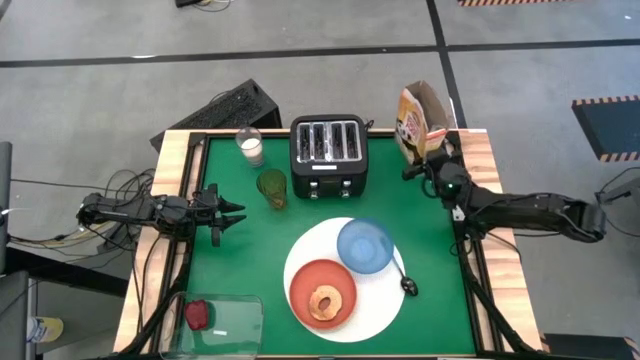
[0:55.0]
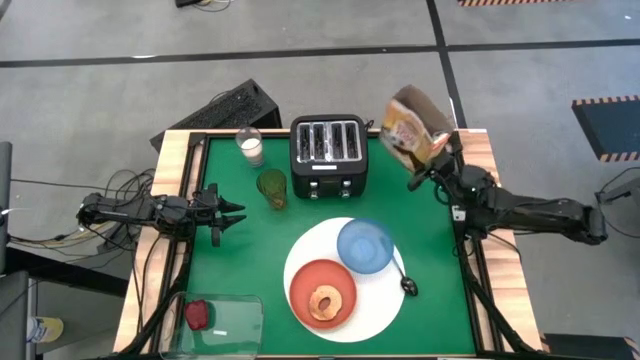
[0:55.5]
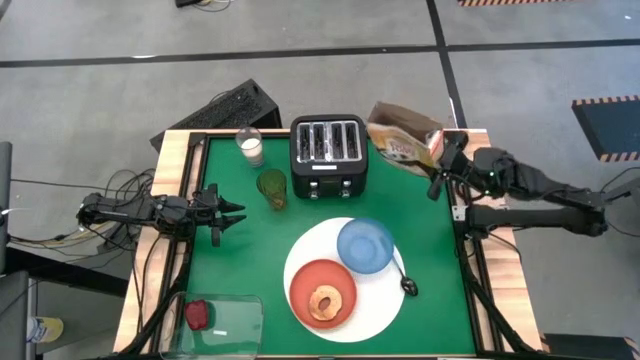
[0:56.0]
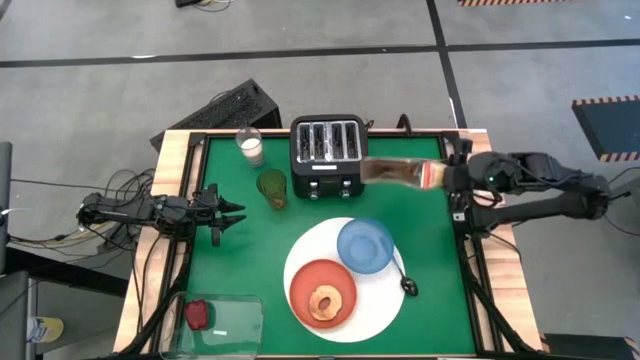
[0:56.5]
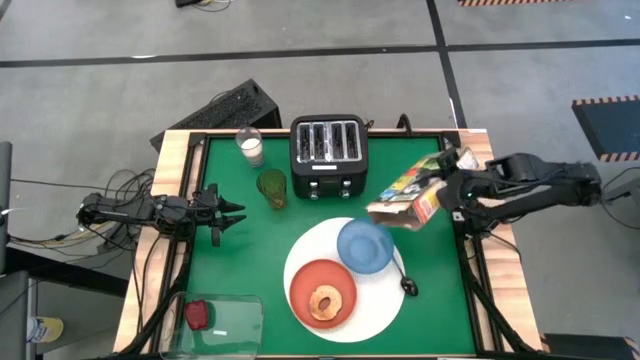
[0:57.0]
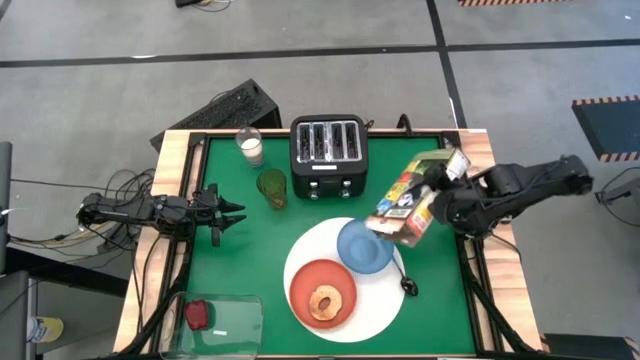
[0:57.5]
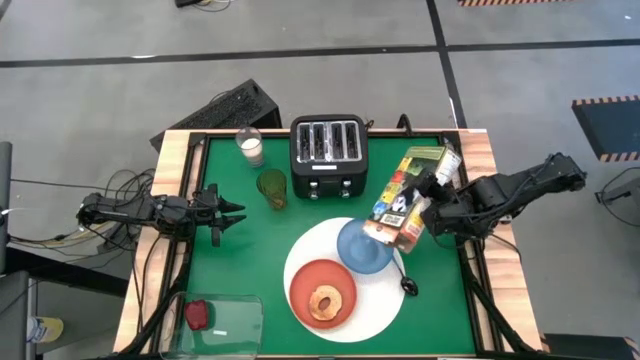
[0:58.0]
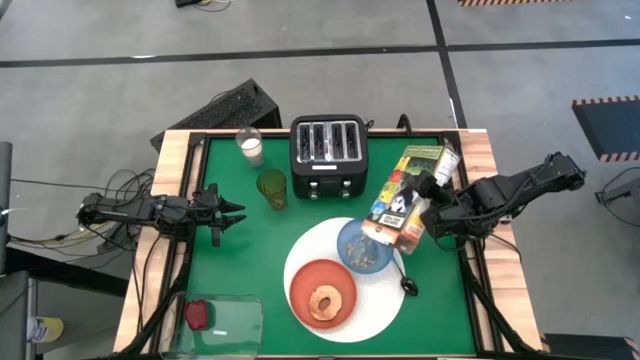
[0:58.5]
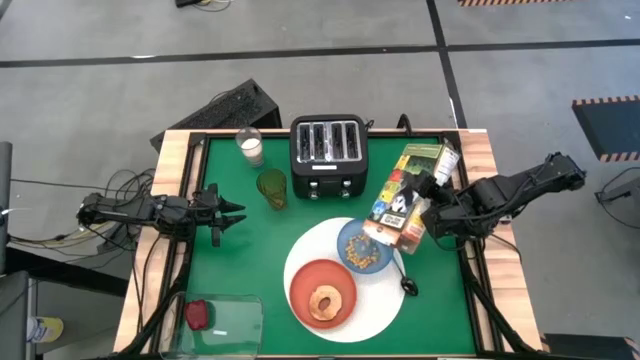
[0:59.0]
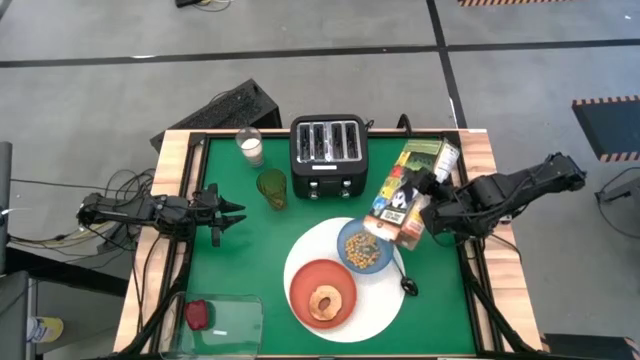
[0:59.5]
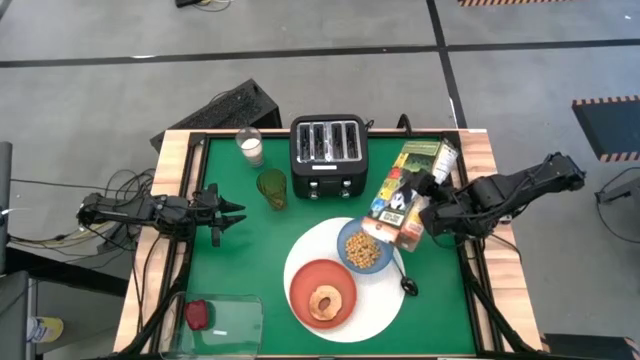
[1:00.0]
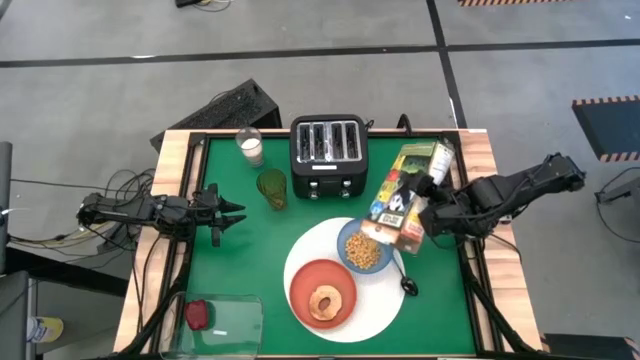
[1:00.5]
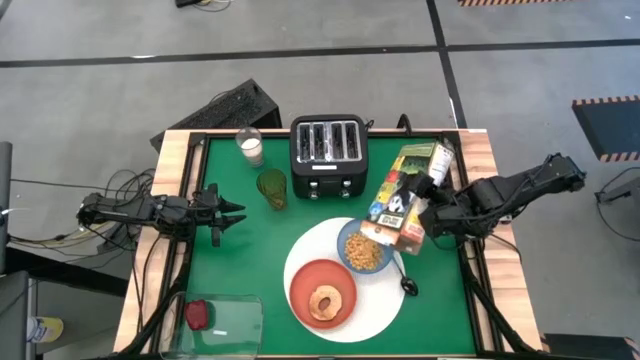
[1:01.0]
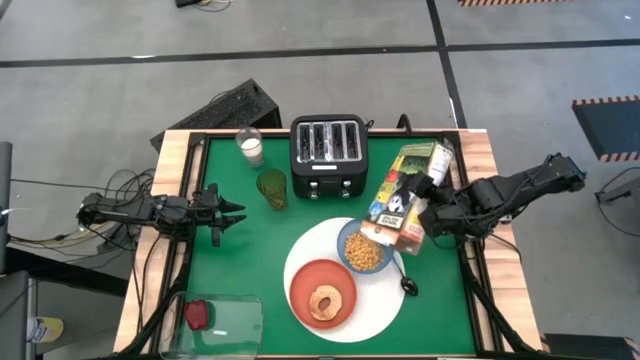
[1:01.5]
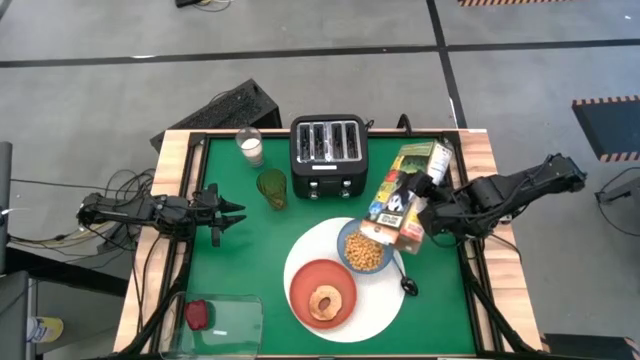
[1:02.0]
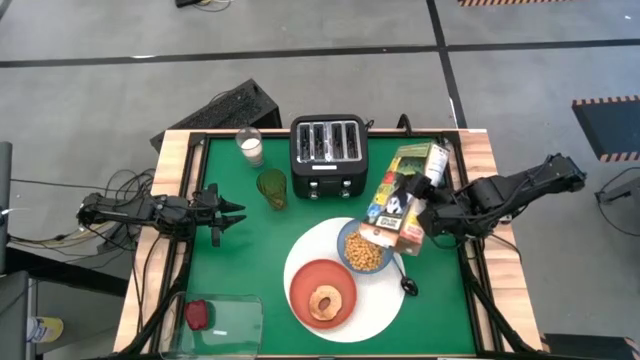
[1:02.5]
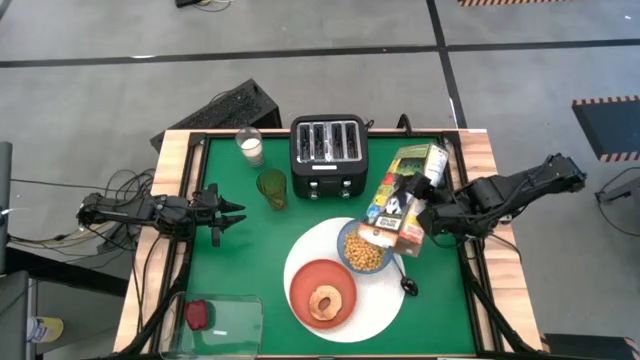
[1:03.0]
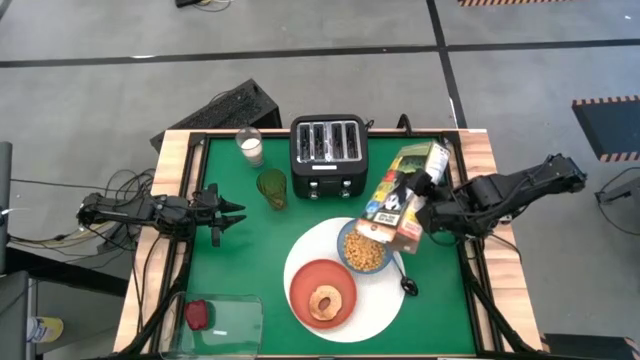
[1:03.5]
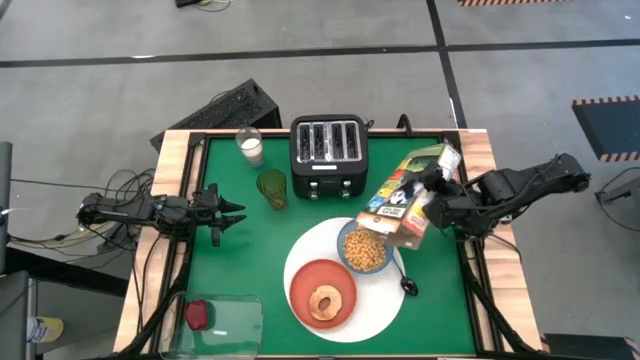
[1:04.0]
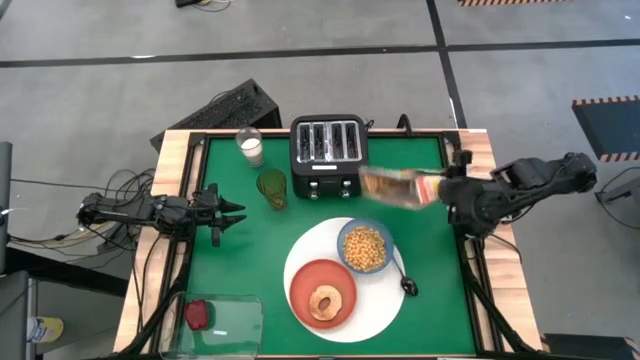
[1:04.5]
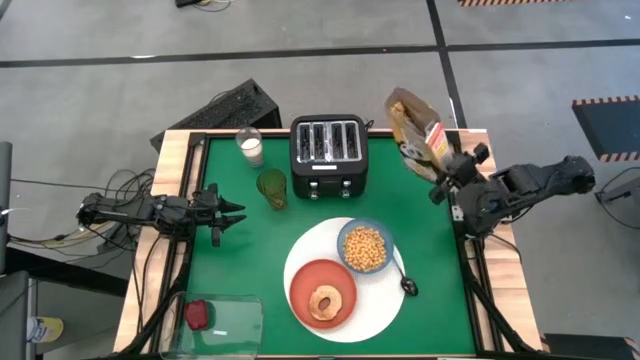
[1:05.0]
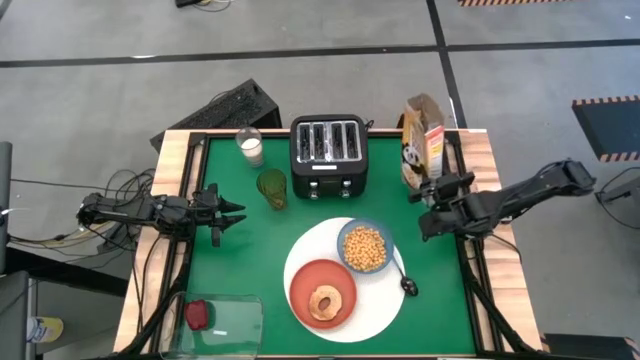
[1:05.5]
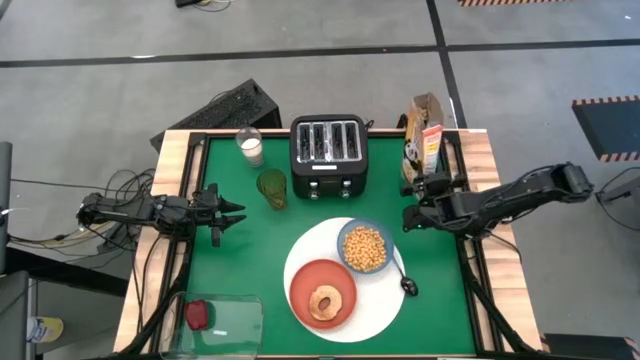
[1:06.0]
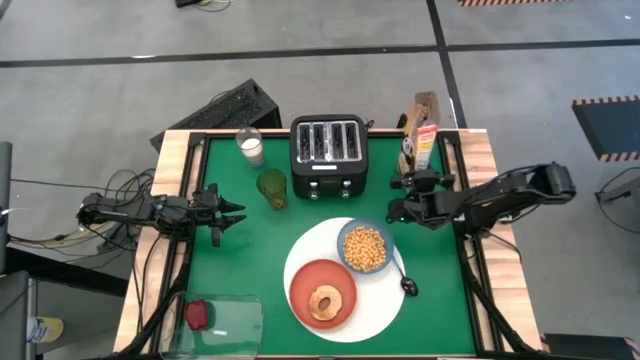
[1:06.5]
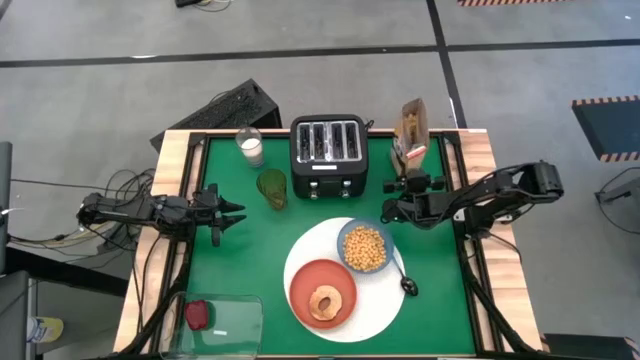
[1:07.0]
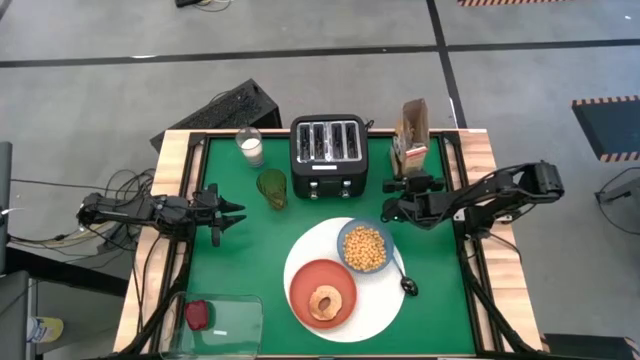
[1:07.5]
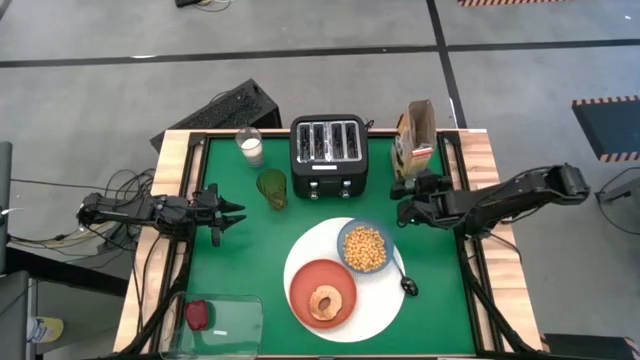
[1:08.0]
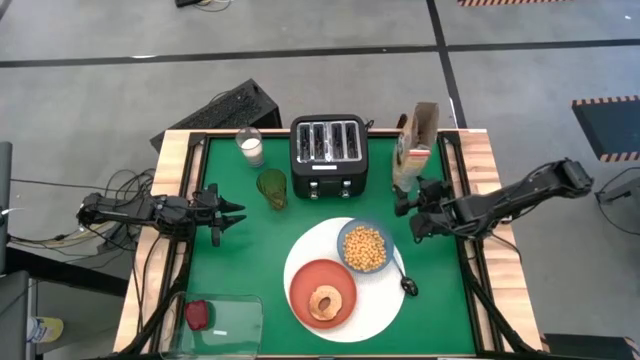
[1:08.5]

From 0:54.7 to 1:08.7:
Task: Arrange a breakfast setting
Pour the cereal from the cereal box into the blue bowl

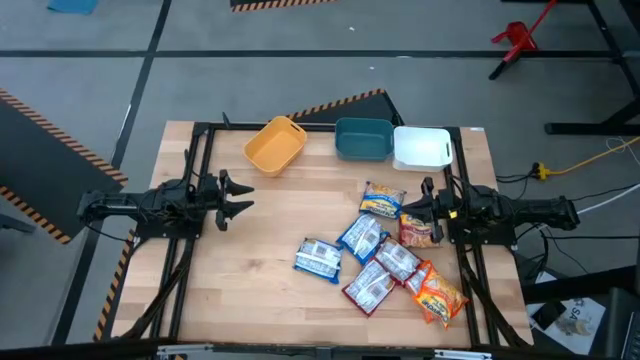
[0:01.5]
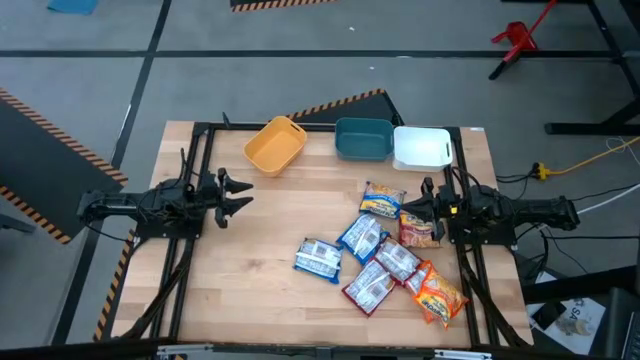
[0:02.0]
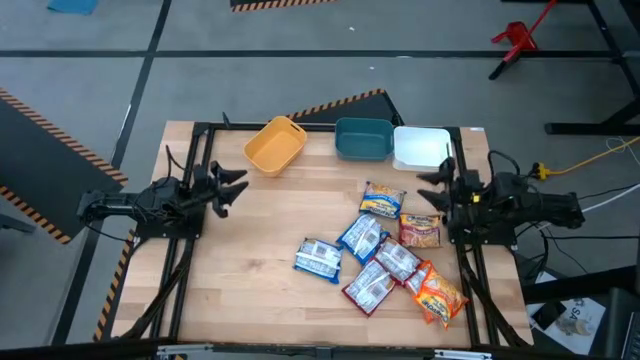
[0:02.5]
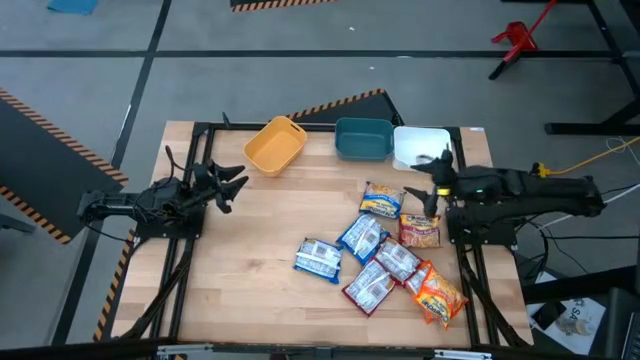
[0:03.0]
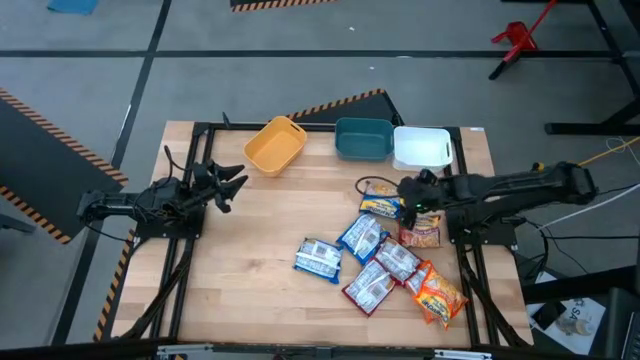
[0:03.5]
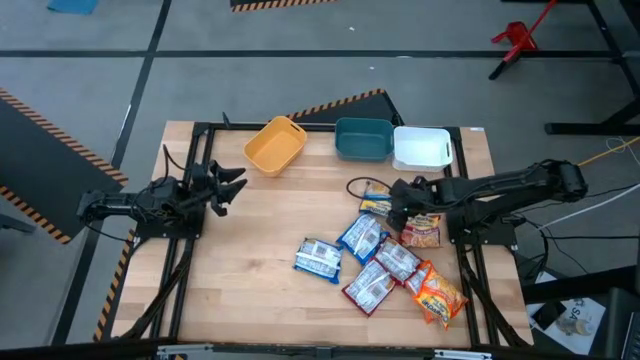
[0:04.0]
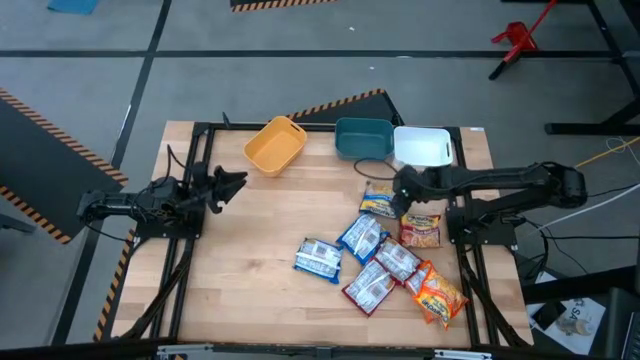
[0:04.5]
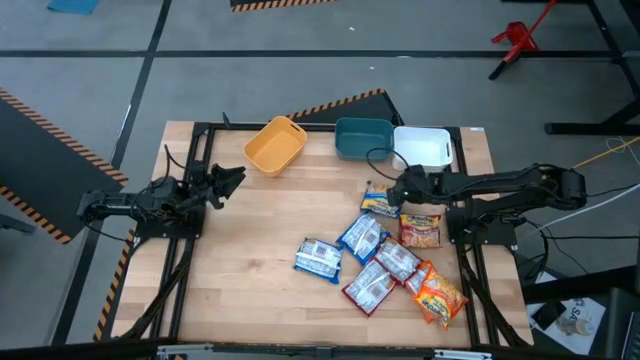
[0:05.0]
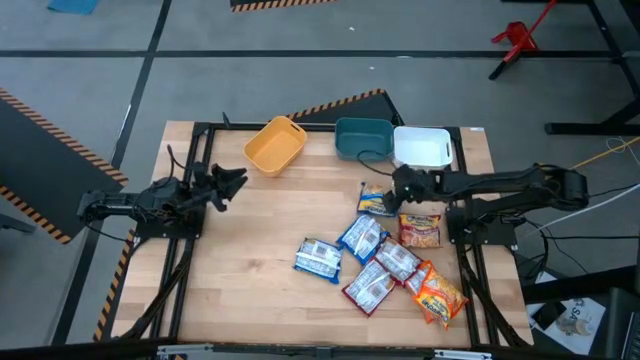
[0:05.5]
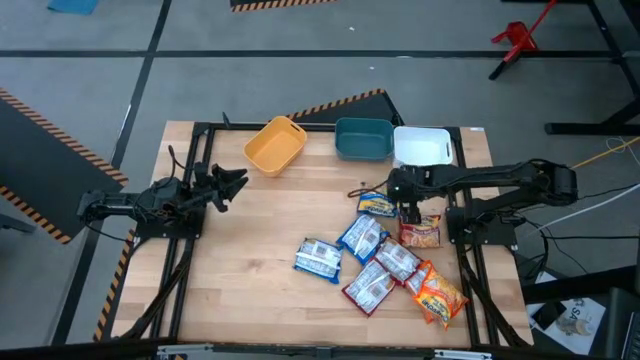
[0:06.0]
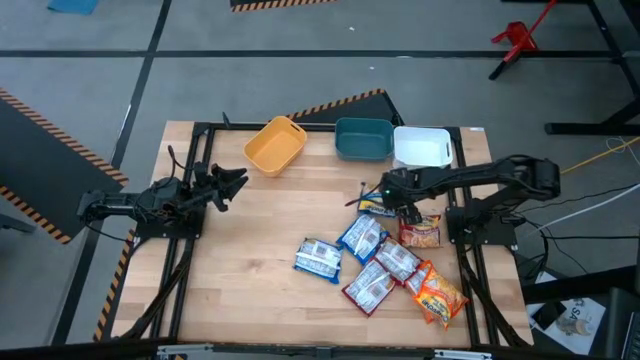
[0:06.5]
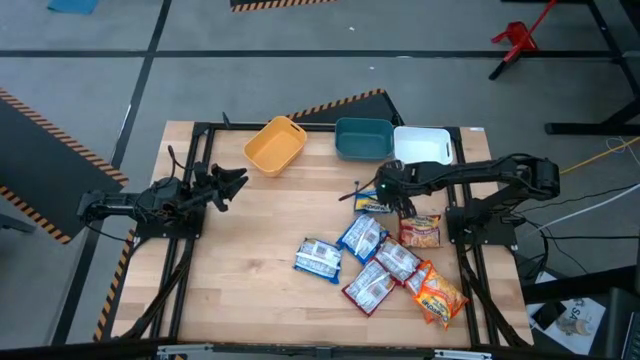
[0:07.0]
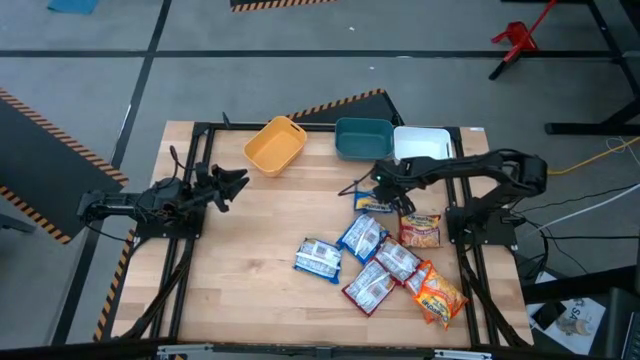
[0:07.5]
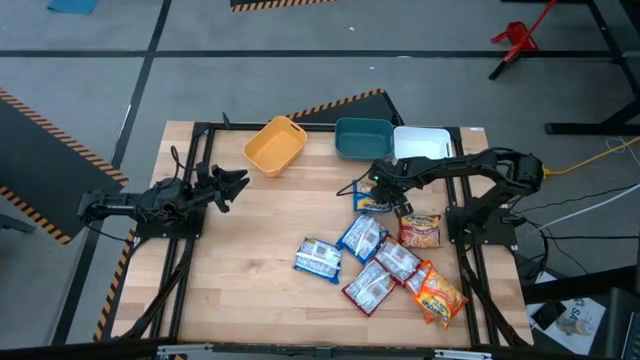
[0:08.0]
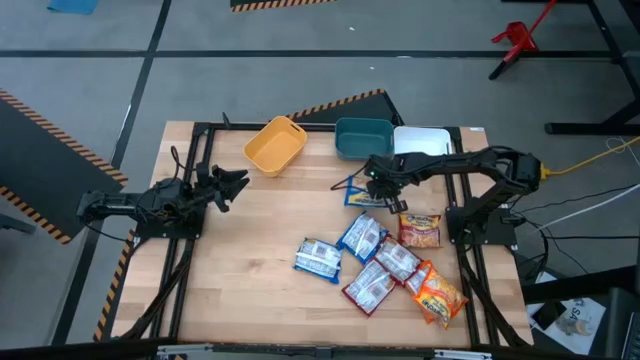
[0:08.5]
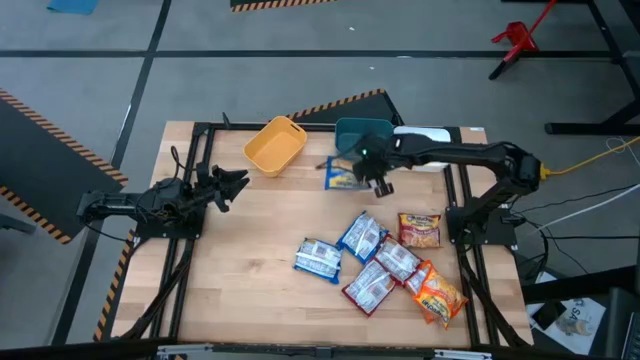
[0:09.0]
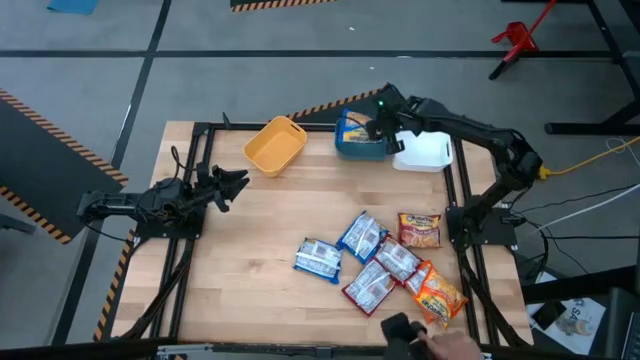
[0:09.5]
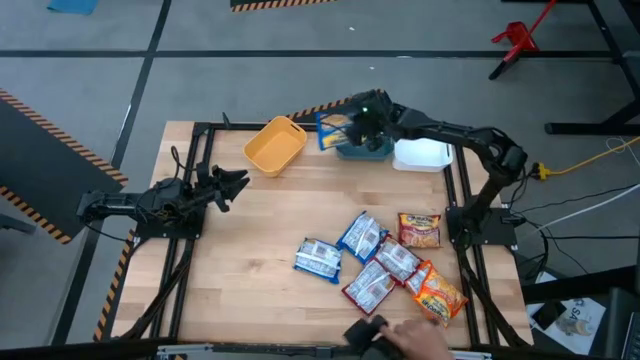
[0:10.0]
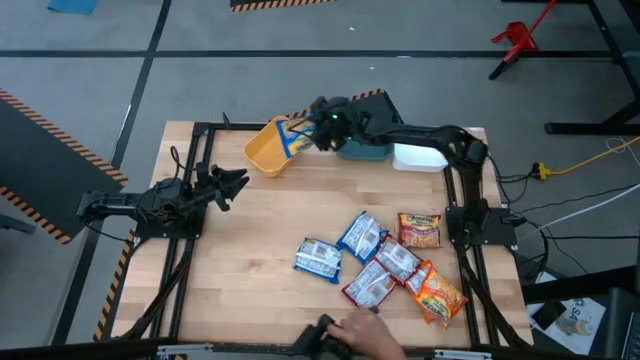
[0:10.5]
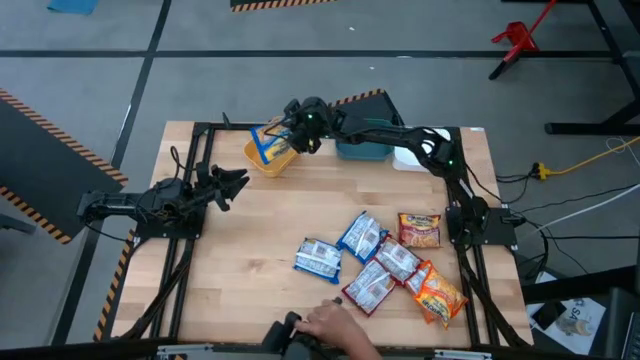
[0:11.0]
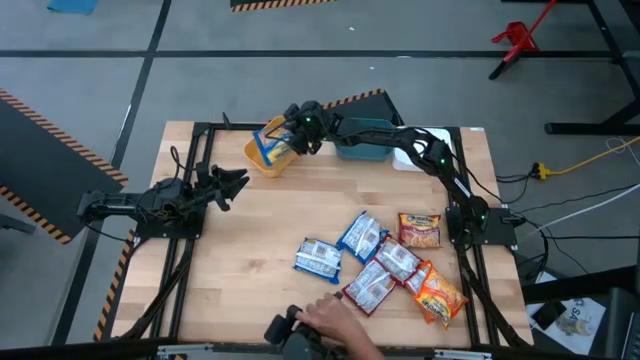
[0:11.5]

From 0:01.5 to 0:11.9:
Task: Sort Maruchan noodles
Put the top right blue noodle pack into the yellow bin
